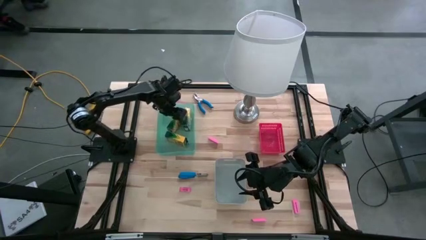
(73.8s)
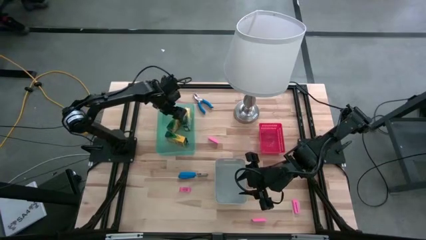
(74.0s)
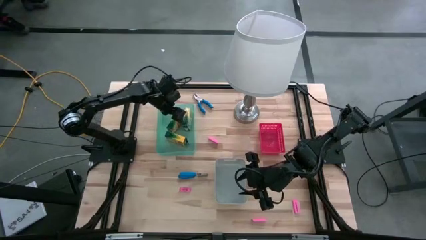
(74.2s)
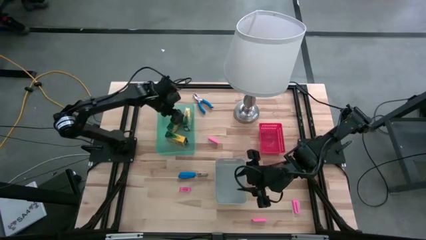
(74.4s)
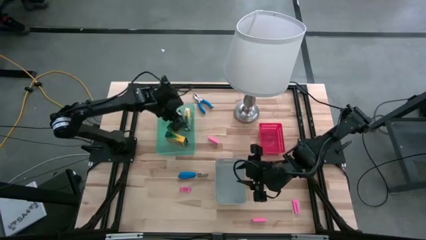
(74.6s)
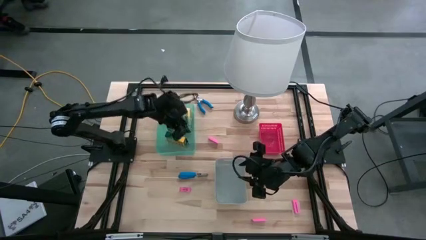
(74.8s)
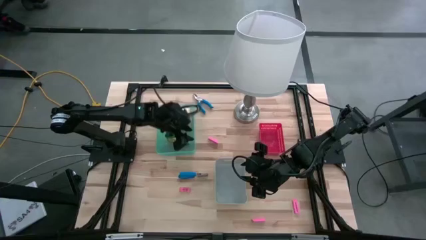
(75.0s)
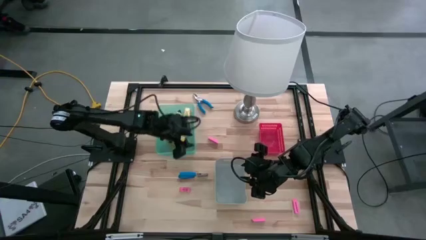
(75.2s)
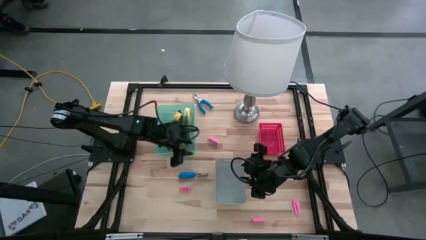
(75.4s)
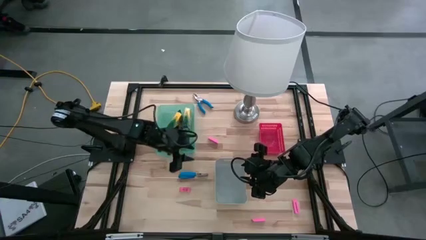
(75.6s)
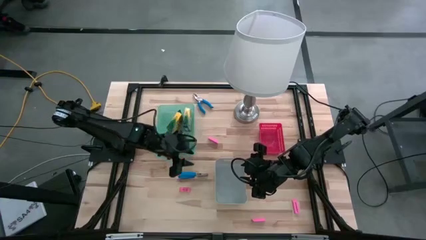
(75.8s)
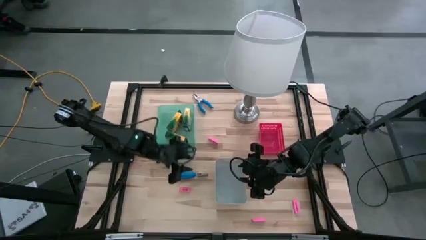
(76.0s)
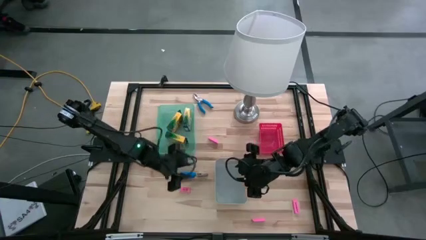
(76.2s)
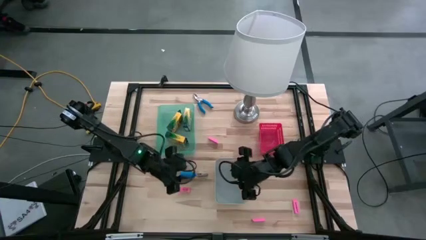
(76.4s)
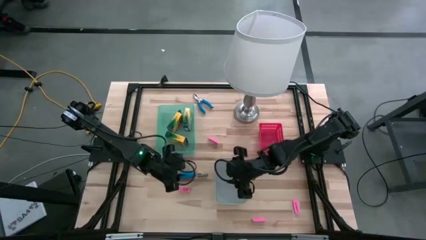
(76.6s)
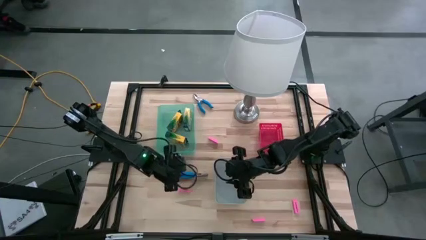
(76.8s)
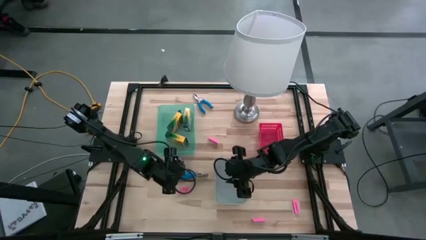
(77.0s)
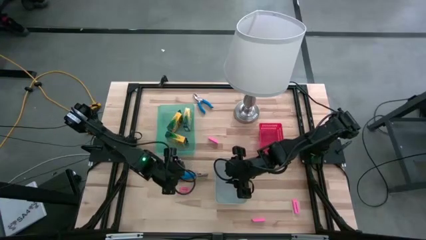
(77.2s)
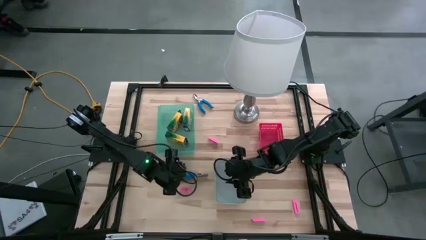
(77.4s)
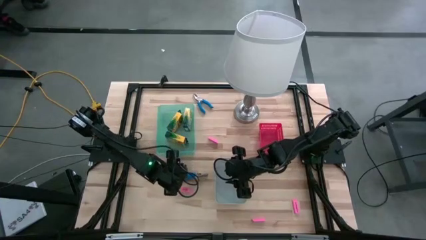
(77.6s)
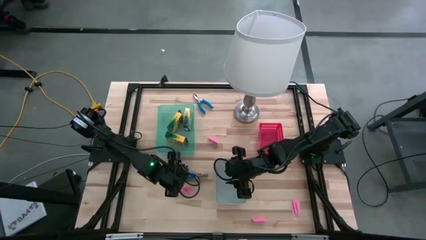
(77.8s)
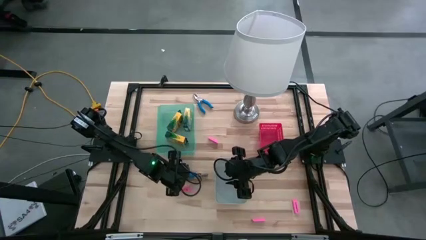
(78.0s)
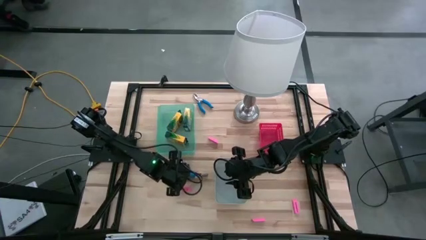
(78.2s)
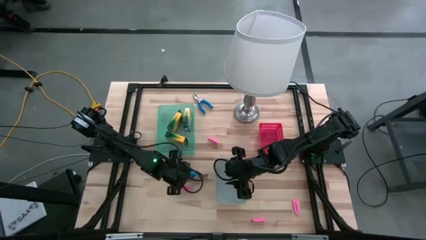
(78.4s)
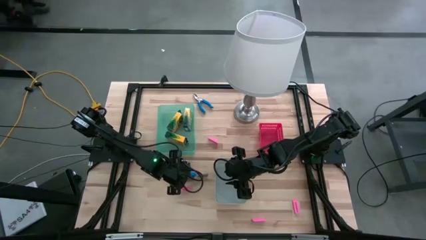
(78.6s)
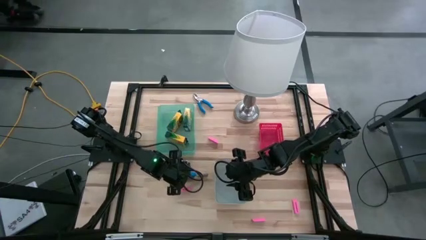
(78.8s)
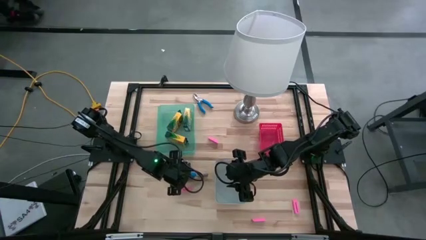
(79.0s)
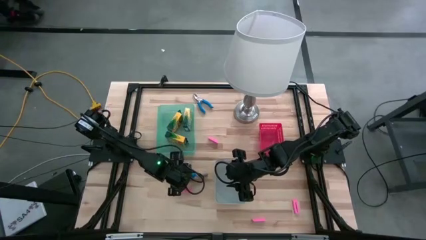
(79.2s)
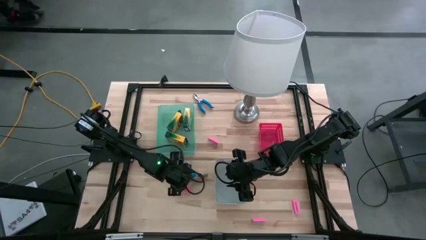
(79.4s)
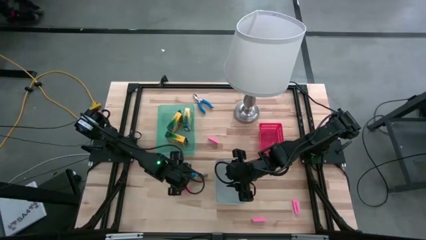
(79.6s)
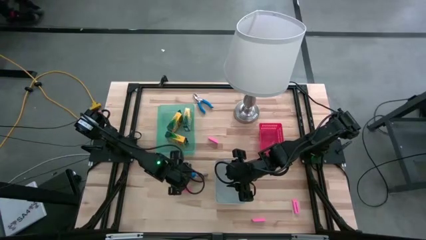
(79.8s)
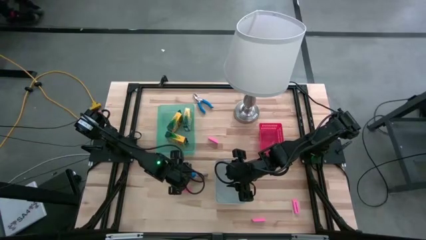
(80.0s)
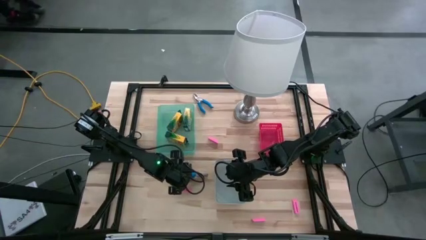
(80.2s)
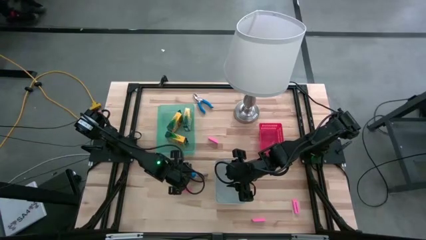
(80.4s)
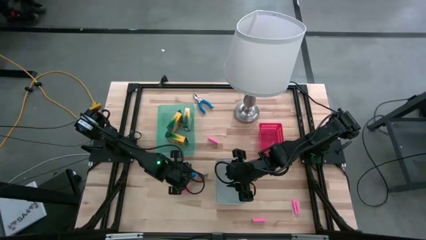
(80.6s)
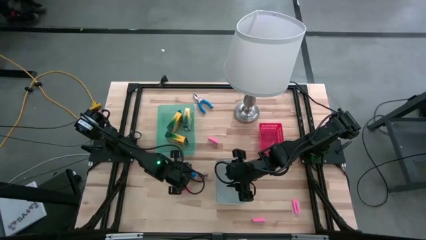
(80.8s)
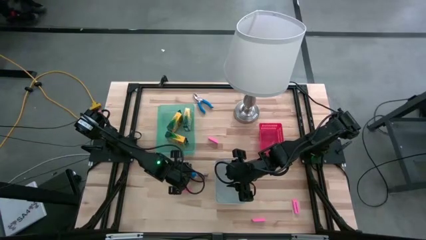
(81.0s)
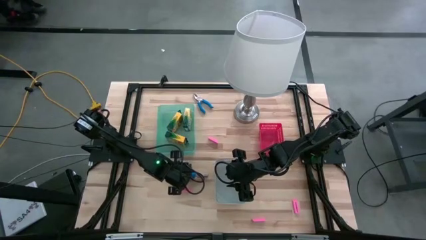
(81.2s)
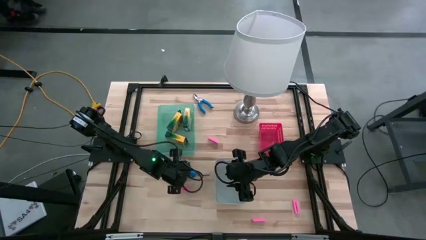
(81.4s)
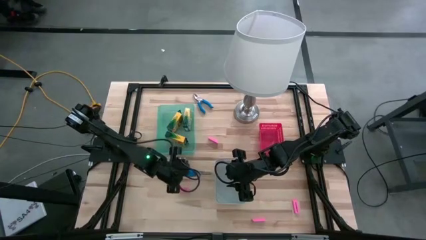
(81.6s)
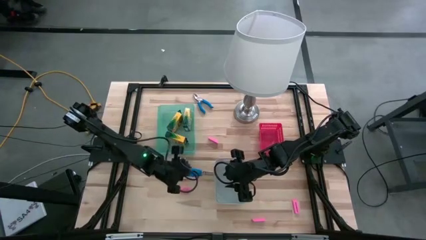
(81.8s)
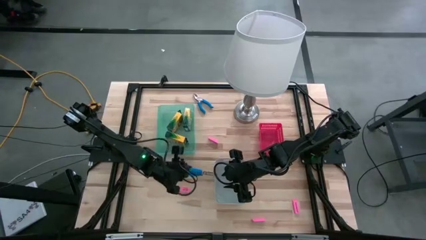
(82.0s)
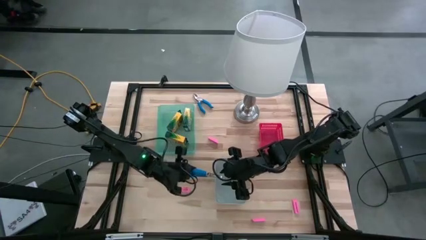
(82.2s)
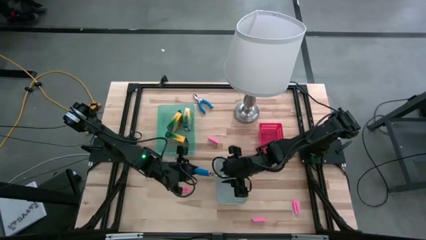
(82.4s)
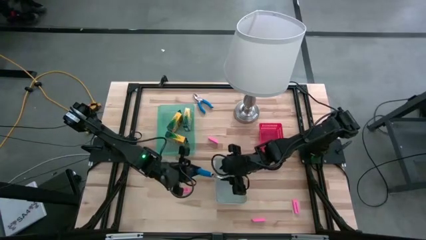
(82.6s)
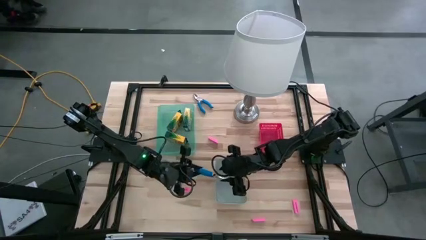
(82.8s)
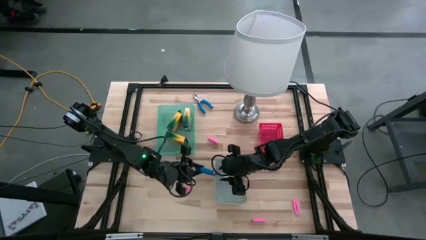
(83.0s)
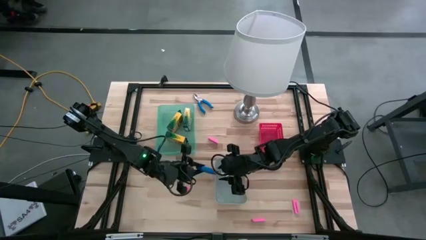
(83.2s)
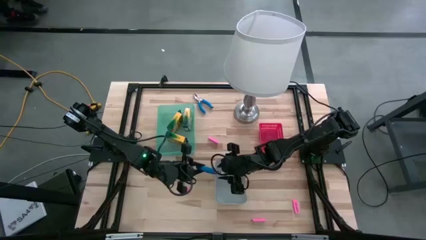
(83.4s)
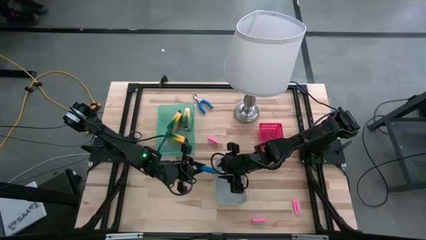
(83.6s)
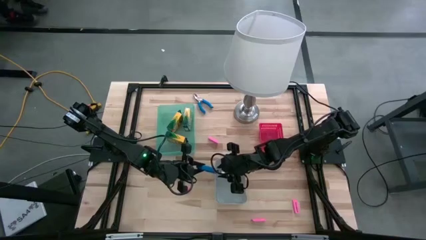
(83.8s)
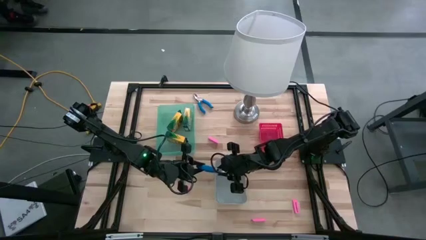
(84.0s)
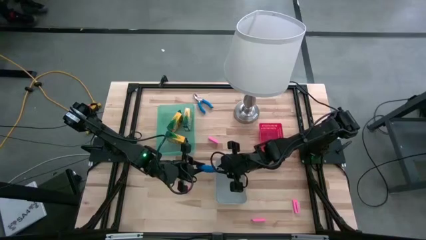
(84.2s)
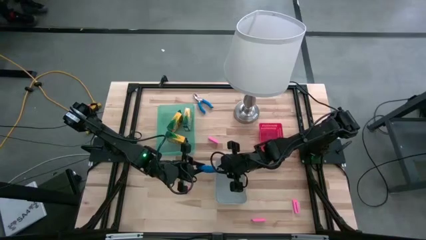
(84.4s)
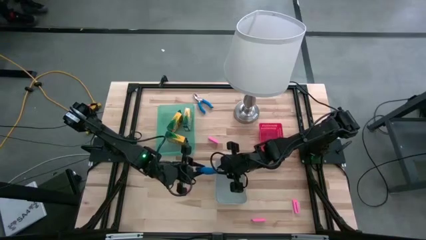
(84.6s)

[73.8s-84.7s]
Task: Pick & Place School Supplies
Put the blue puncher into the gray bin

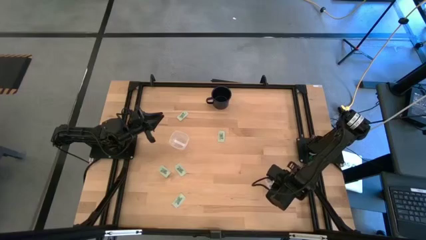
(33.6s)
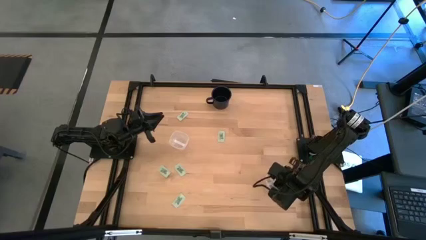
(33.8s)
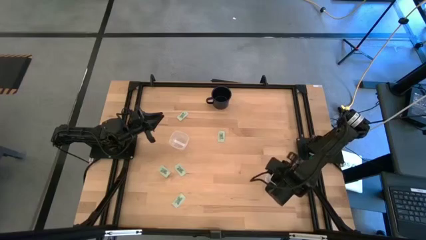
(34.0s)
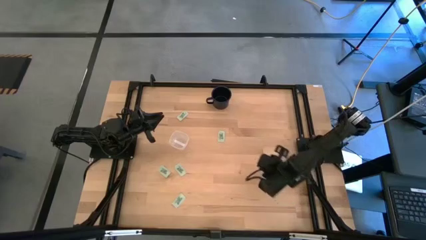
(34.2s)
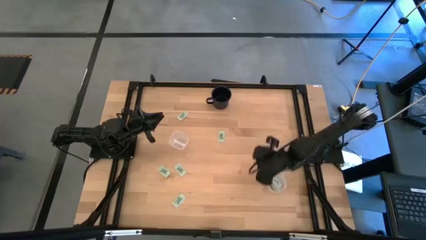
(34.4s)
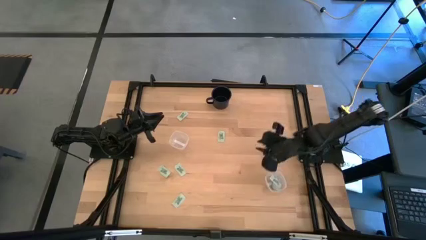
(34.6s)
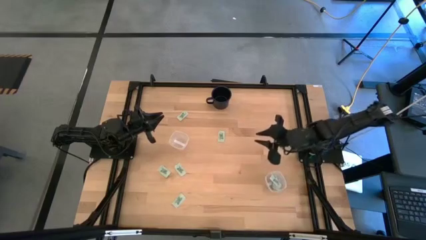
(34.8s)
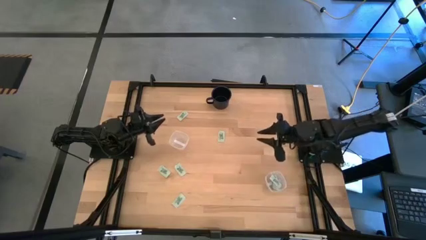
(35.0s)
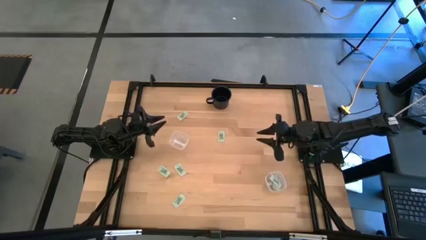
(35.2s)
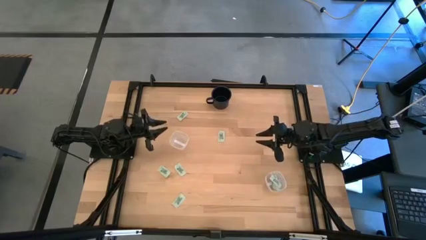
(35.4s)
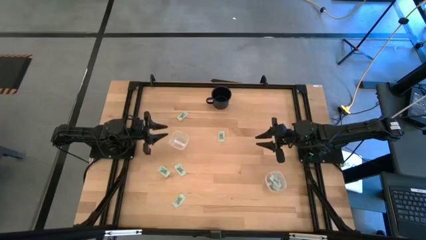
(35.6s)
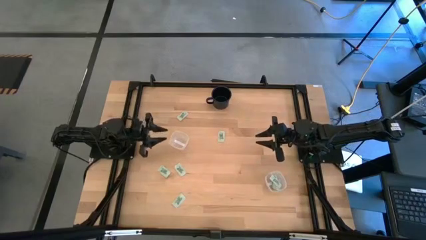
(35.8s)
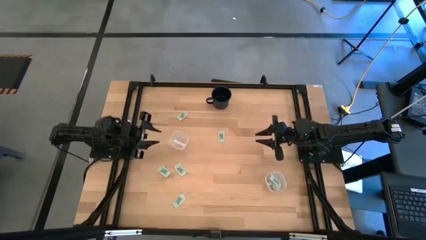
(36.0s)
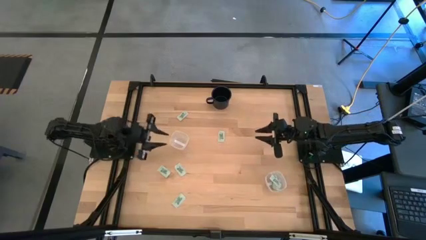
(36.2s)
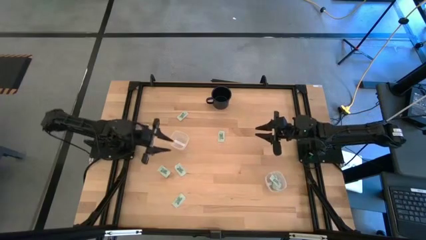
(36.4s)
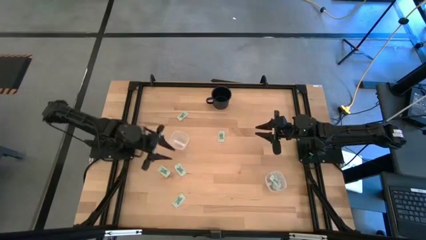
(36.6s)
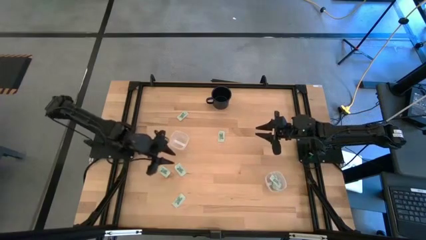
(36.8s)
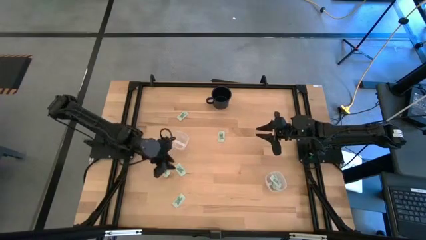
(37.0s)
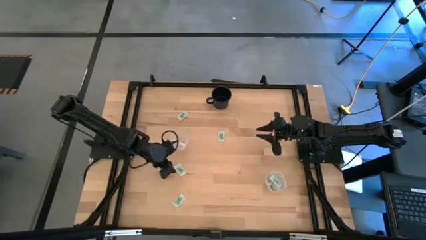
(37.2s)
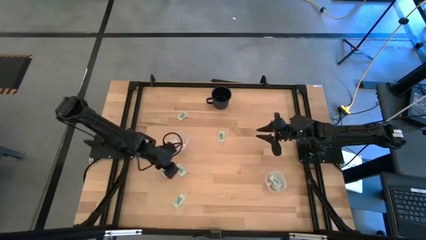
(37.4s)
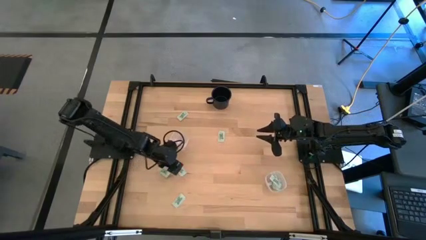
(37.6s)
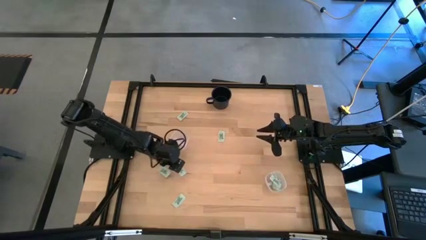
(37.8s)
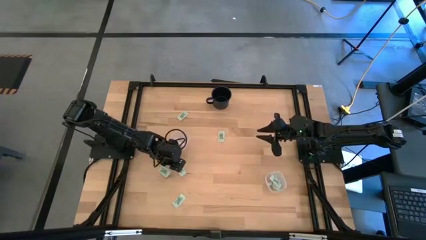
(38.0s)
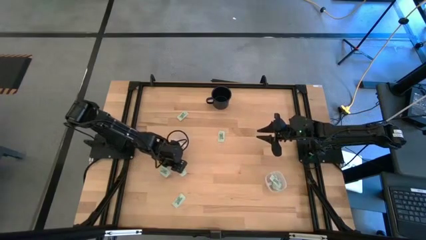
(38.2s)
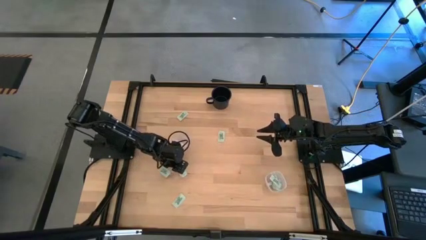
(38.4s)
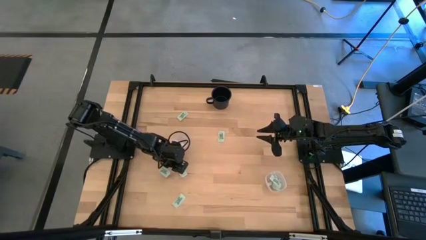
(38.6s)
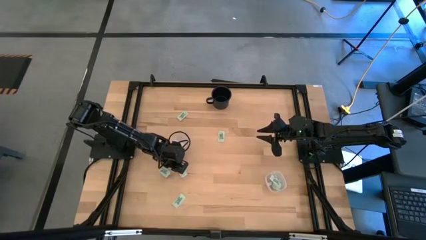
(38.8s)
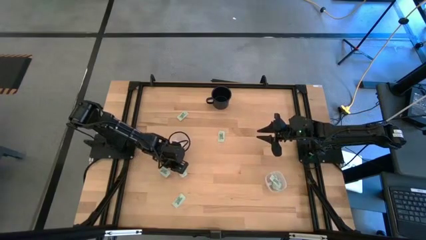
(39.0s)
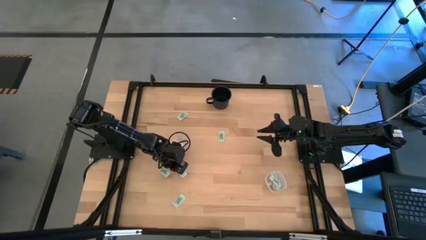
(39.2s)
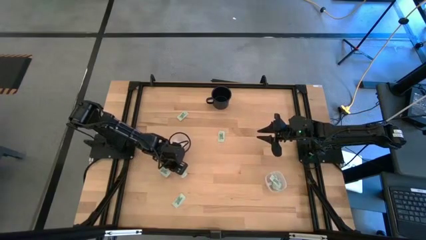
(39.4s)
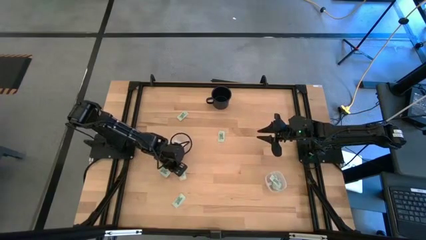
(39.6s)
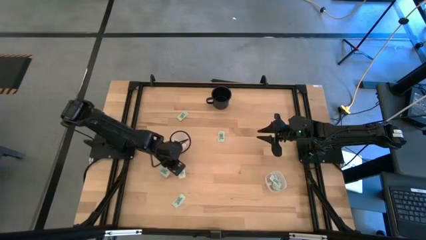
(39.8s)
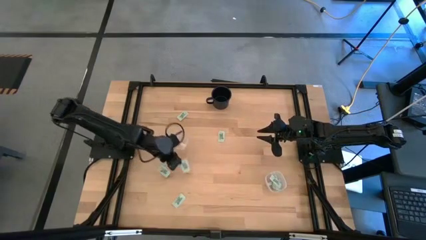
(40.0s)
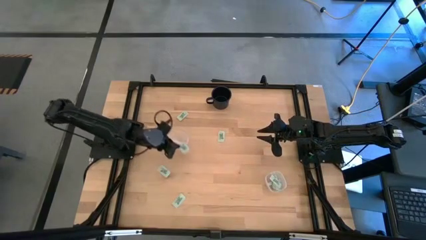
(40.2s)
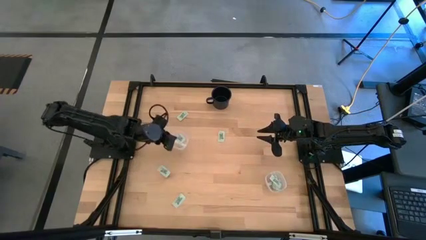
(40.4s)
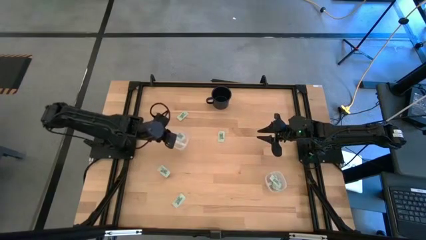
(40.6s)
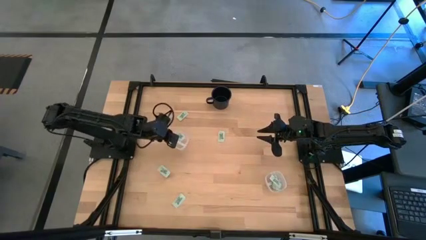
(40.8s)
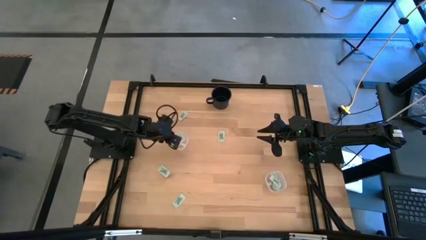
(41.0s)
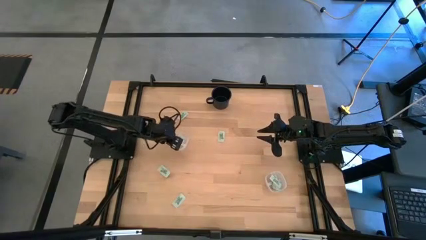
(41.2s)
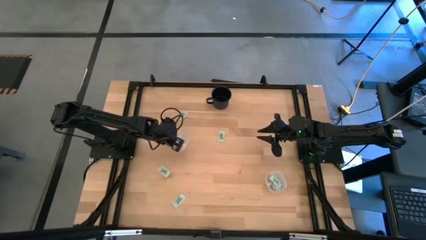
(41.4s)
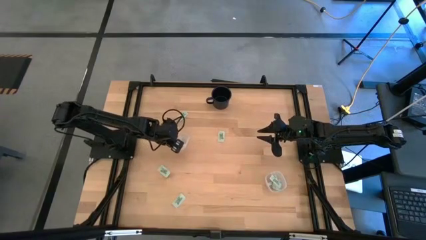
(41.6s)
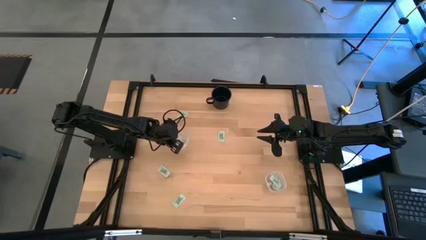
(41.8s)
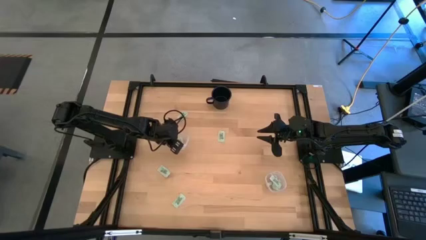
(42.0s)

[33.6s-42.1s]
Task: Pick and place items into bin
Put the white stevia packet into the top transparent bin
